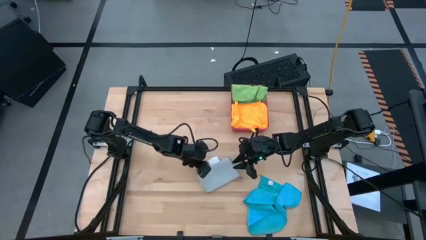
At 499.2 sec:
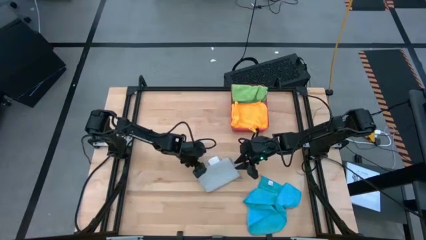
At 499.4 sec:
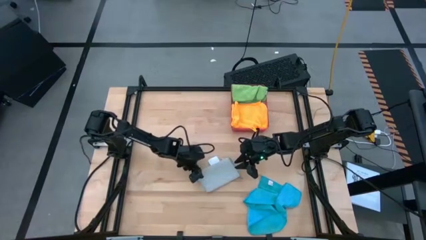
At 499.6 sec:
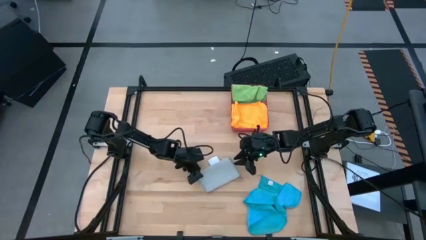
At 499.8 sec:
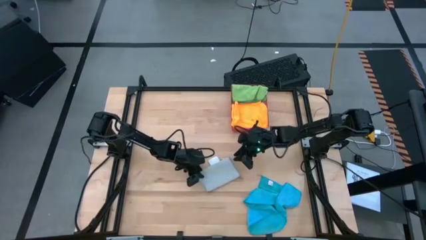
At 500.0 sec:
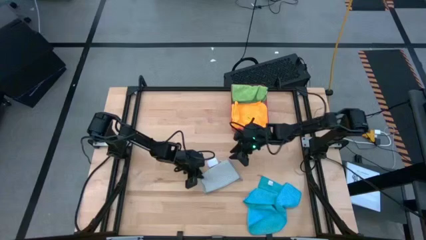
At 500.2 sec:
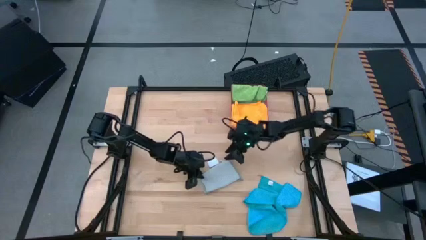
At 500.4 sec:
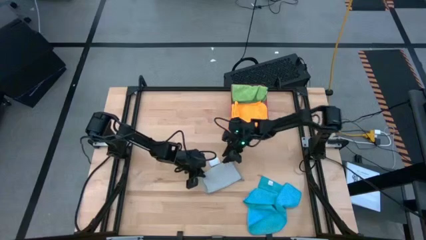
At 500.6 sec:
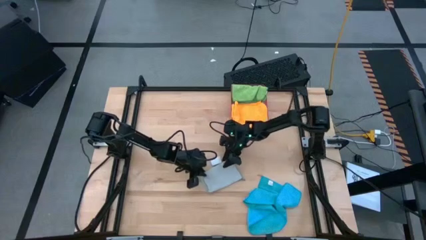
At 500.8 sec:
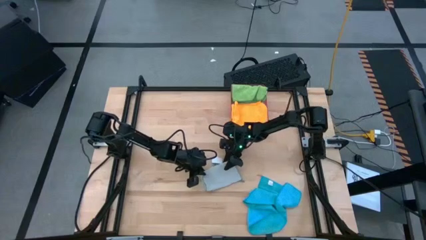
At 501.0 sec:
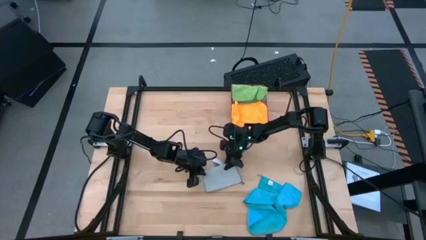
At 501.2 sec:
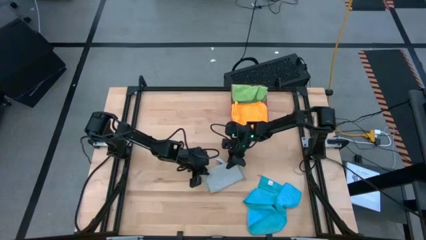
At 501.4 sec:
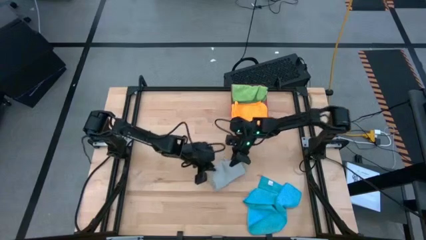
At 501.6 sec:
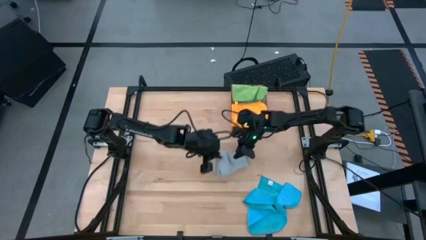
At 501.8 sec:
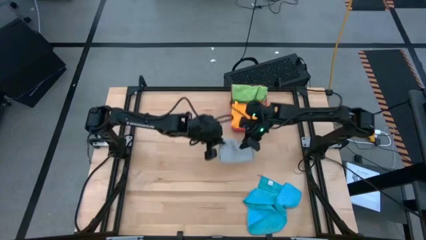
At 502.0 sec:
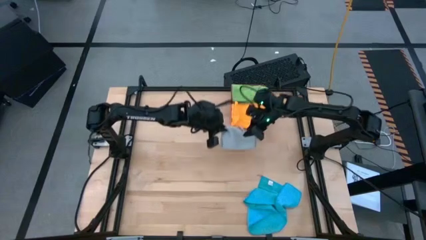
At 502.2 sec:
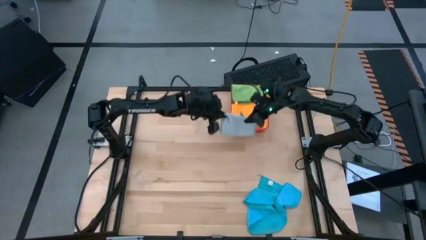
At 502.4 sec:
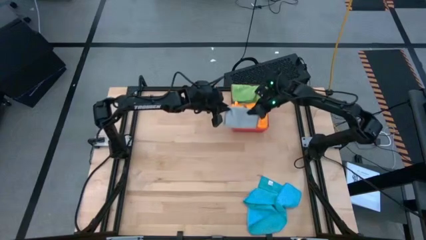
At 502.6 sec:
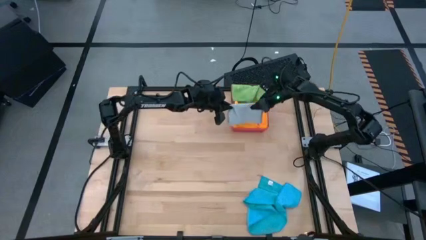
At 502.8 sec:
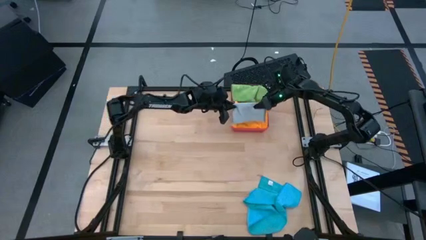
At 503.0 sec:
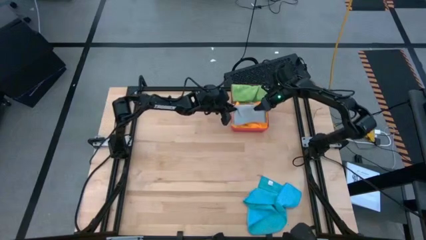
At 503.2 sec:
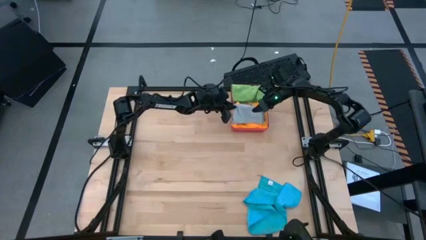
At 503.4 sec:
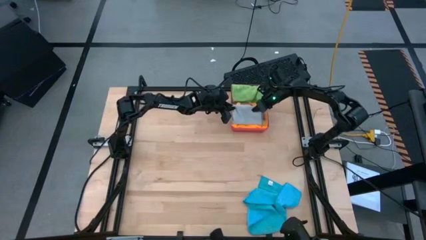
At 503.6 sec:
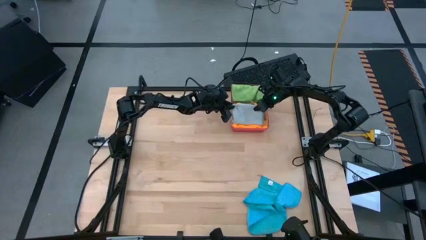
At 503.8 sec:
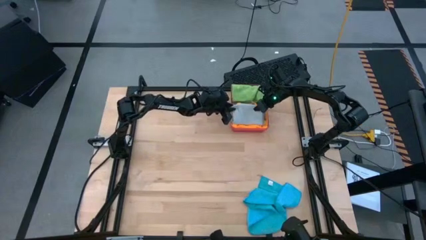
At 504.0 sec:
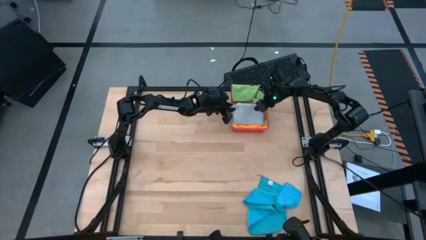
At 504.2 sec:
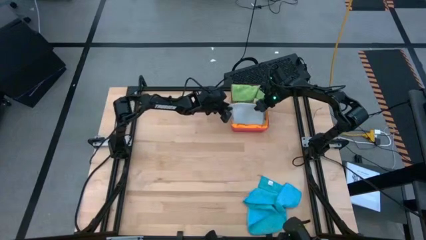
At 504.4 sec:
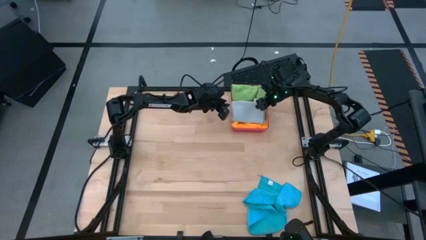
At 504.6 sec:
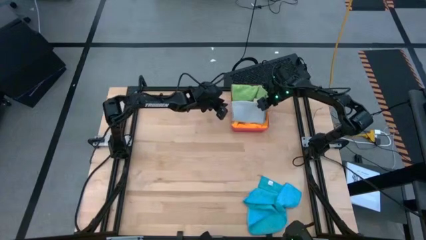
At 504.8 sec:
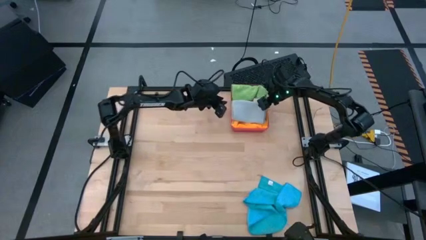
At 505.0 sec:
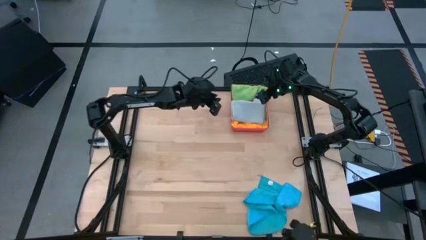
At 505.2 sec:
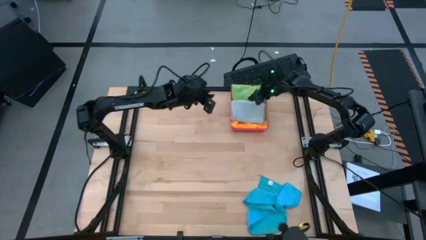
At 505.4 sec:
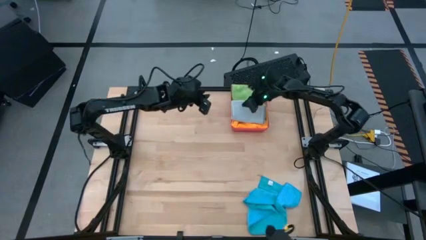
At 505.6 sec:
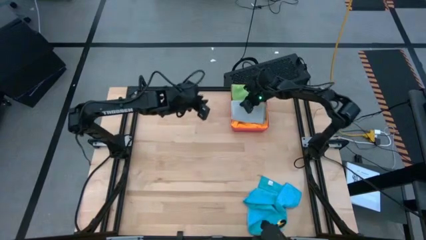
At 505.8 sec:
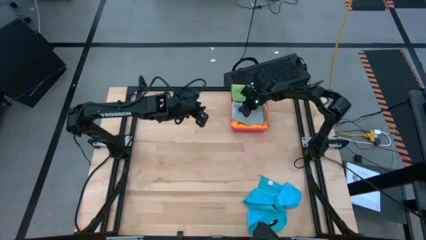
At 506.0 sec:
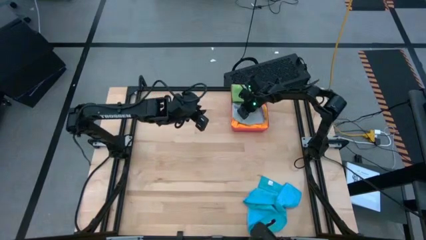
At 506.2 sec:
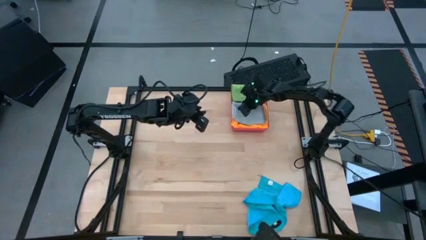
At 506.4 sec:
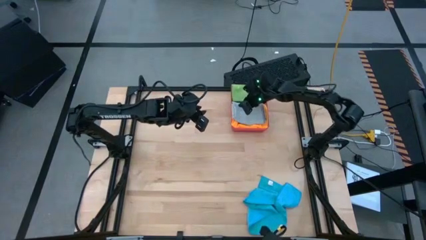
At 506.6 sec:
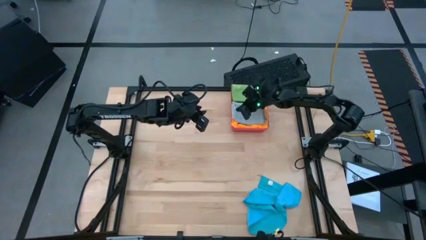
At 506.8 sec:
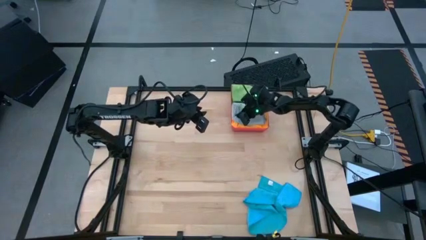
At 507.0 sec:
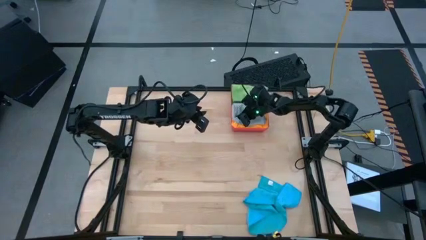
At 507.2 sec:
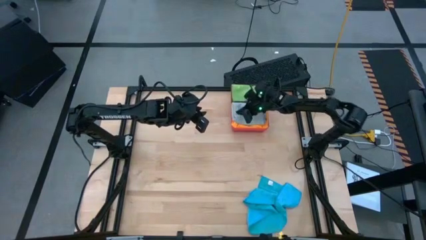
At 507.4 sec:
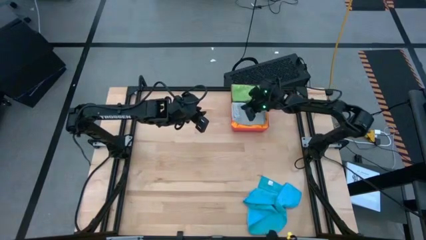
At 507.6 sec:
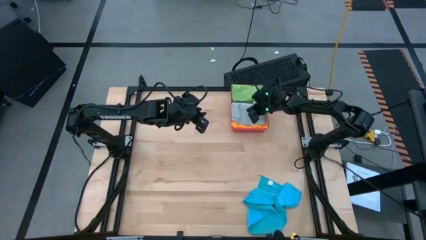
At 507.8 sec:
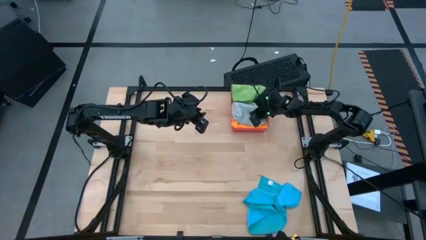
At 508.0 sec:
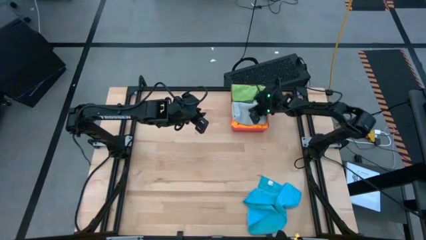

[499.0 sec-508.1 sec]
Task: Fold microfiber towels
Stack the gray microfiber cloth on top of the yellow microfiber cloth in the red bin

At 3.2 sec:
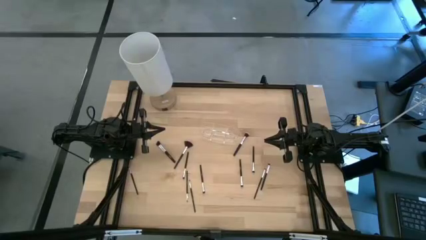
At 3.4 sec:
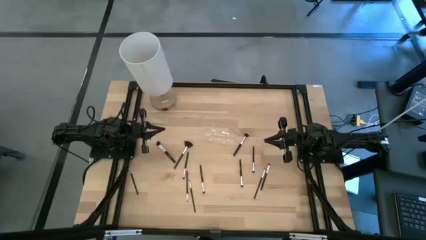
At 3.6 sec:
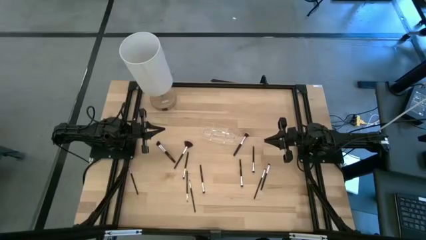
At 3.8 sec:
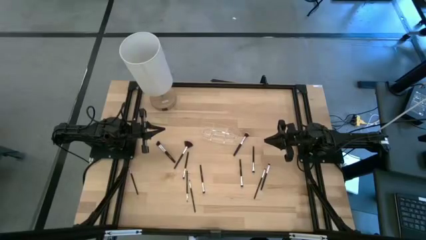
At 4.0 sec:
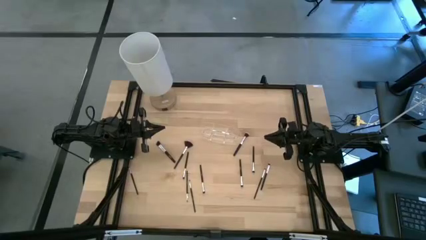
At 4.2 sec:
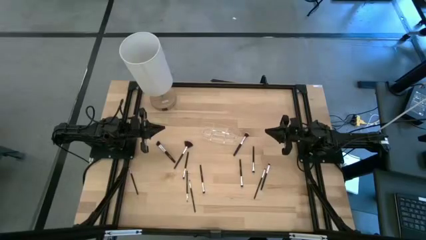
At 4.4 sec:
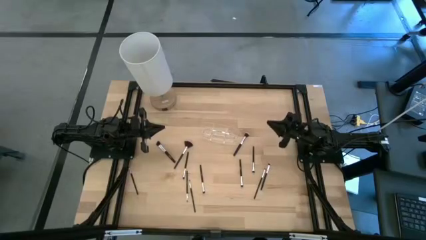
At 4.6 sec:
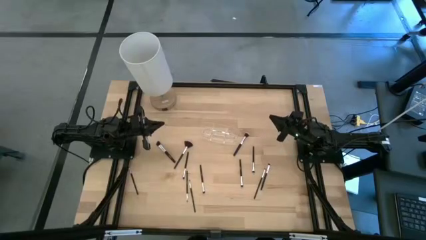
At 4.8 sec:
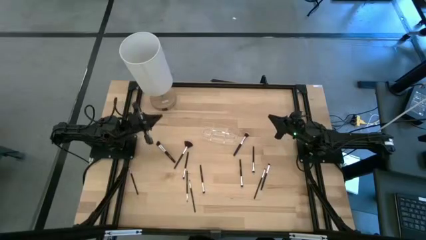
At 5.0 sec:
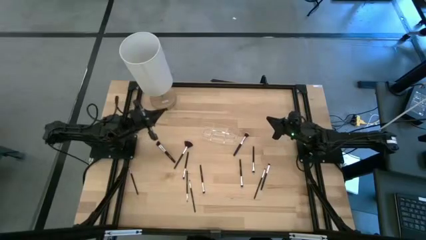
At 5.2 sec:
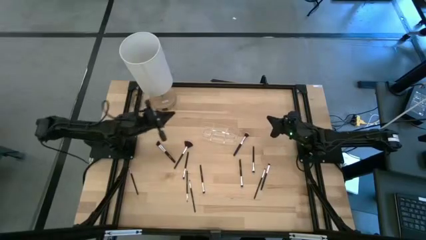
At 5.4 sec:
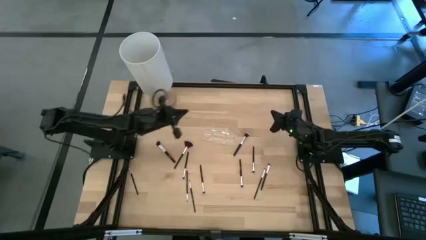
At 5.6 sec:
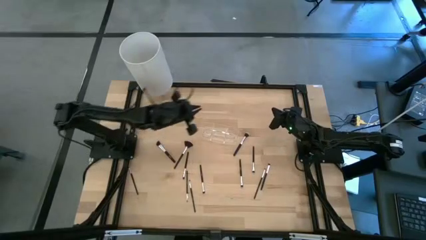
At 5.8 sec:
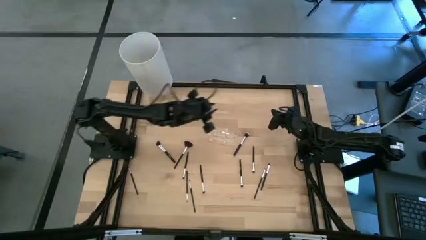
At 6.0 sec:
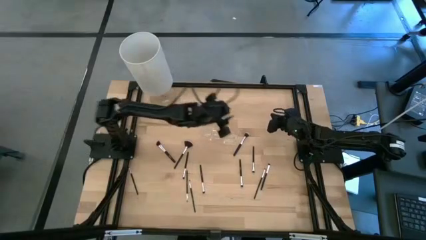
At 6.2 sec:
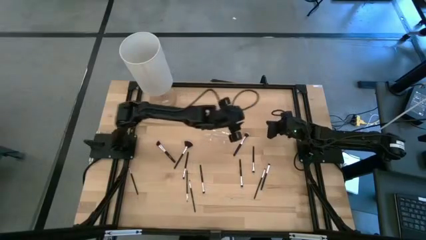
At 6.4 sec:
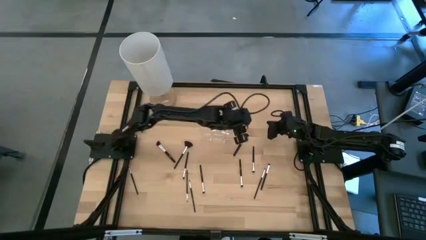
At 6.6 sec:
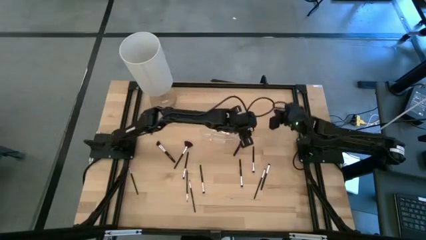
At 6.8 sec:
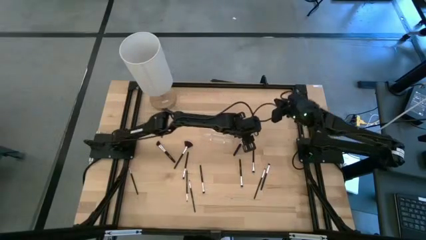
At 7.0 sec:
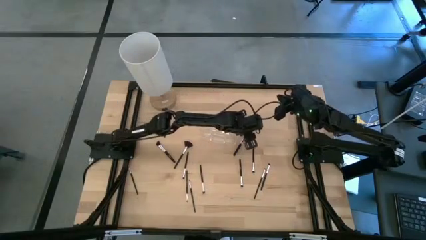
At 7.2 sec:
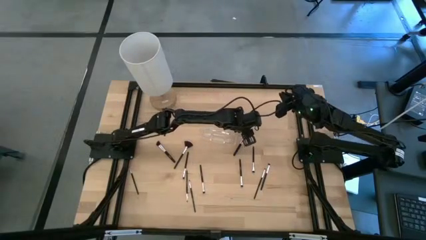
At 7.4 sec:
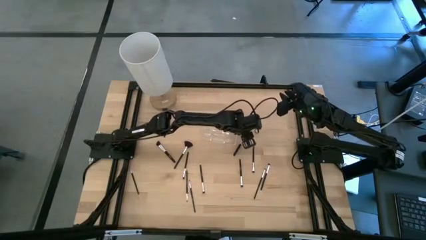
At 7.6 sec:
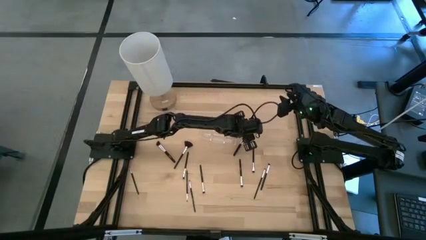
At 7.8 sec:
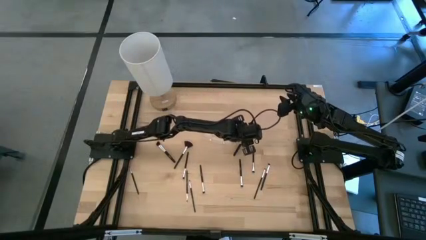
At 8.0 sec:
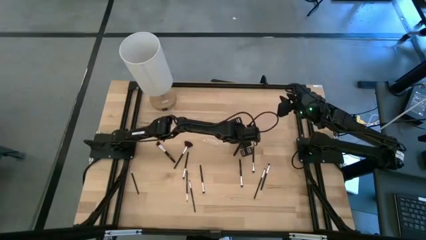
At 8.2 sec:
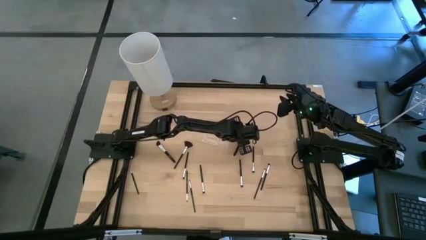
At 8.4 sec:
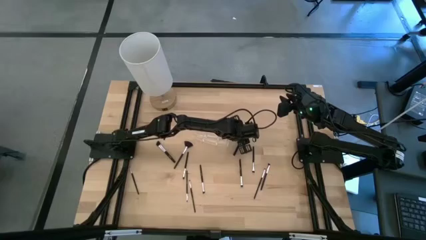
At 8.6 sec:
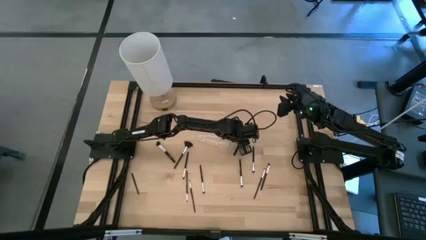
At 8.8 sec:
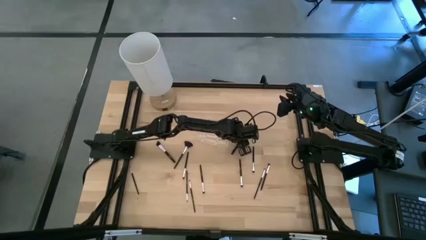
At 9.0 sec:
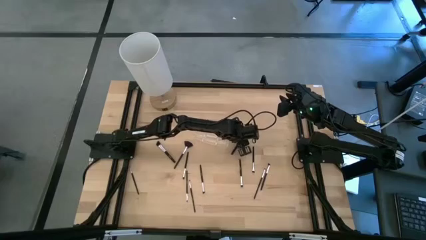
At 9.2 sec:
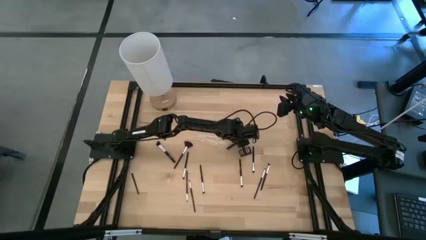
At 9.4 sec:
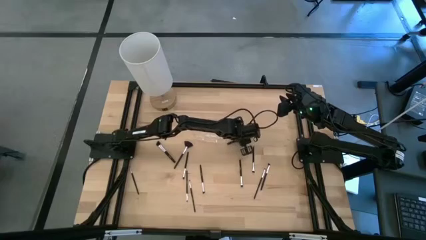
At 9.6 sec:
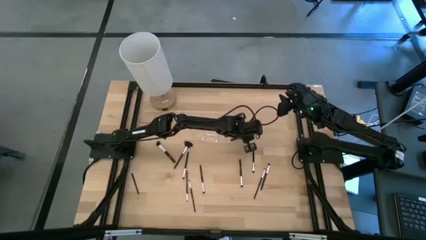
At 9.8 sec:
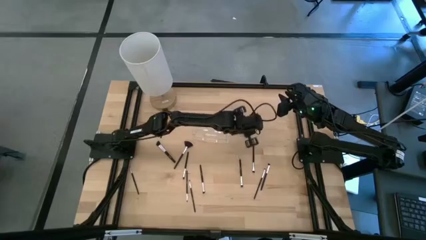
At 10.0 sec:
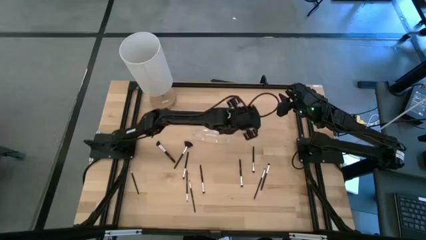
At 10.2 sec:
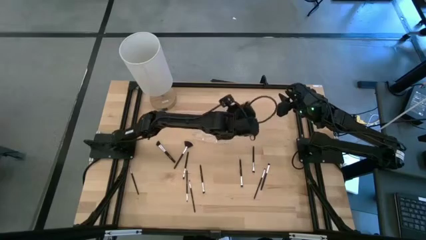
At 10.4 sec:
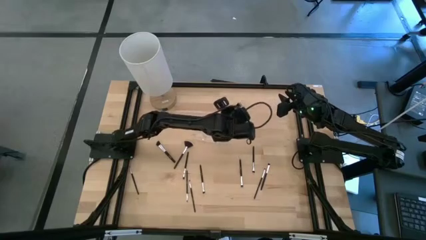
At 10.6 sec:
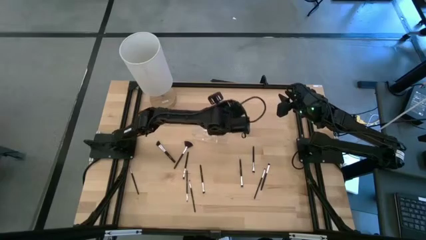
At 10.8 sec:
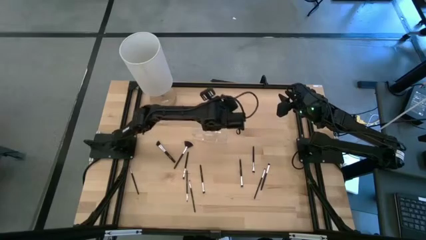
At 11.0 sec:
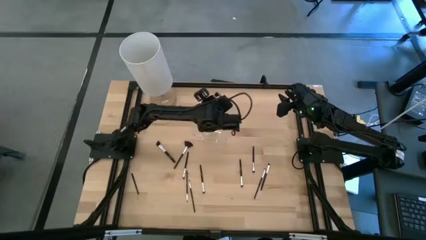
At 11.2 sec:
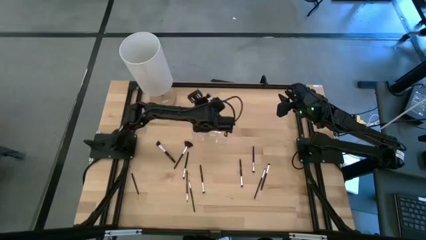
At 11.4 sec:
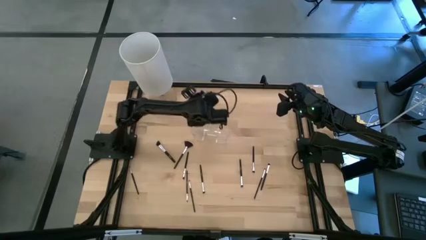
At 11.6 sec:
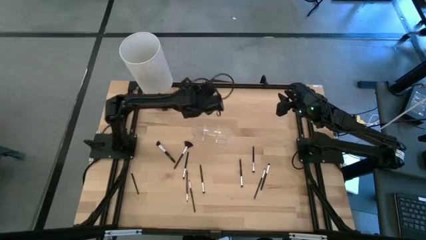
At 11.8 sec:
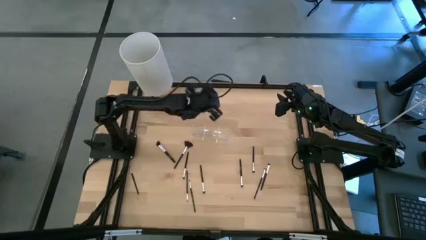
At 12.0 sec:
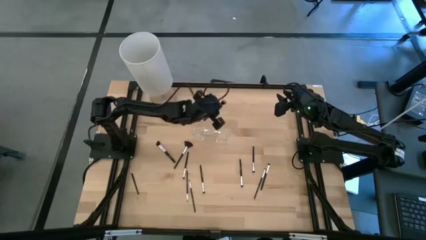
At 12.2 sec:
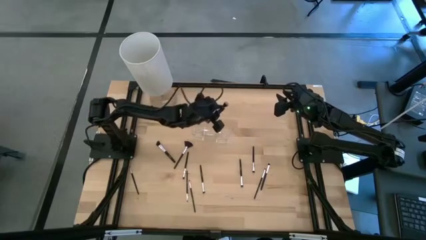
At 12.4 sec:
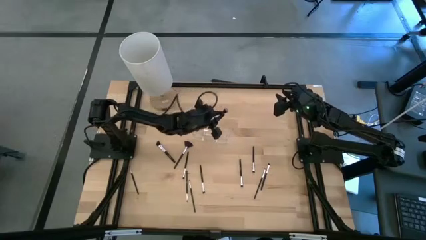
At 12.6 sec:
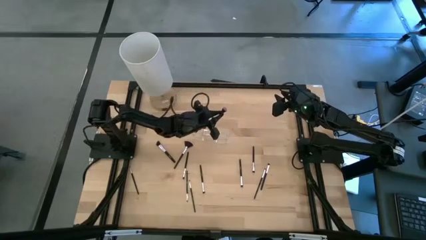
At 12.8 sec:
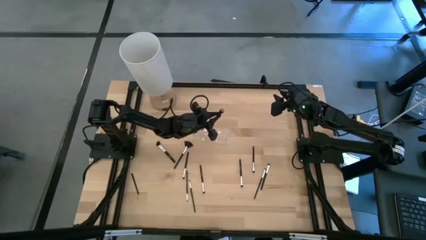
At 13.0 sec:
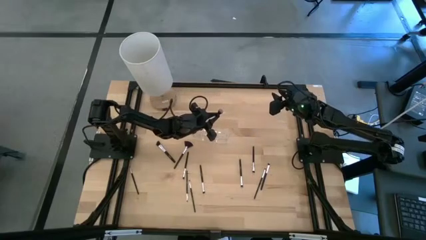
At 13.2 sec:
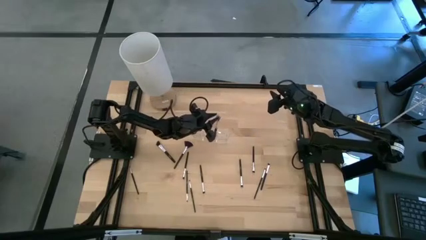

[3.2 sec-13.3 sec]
Task: Put items in baskets/containers
Put the black powder brush into the transparent organizer
